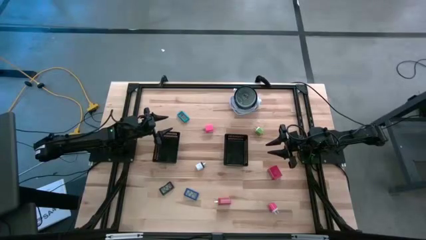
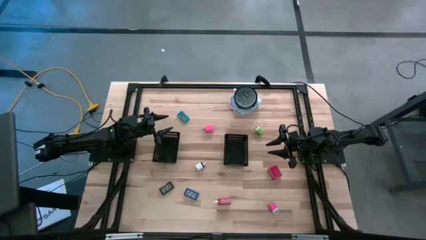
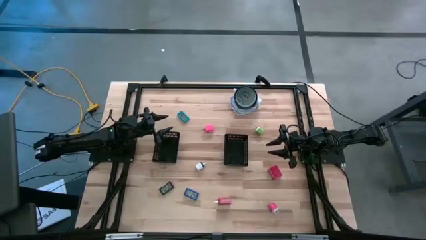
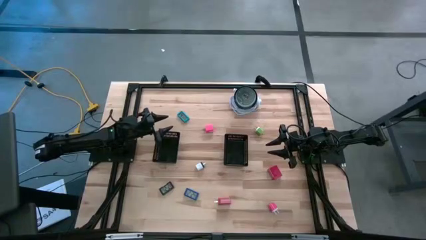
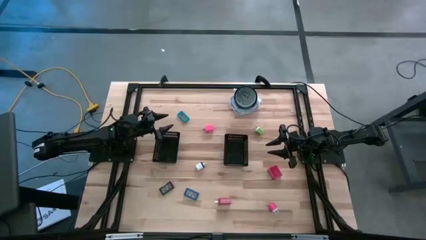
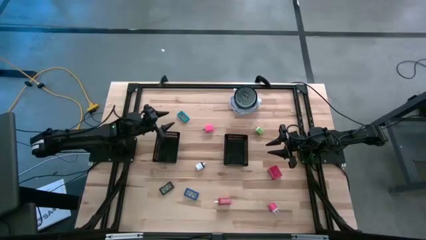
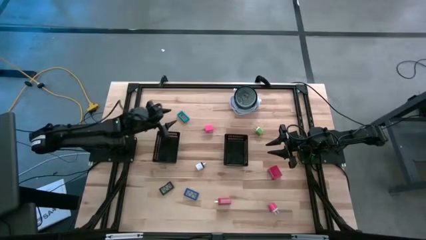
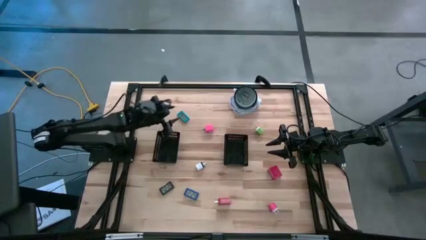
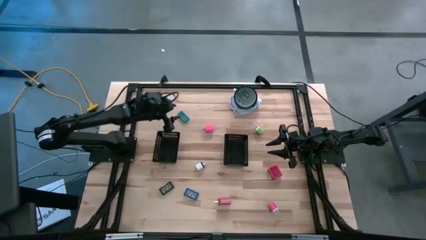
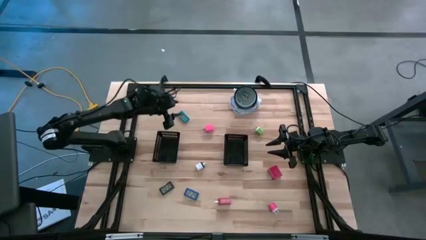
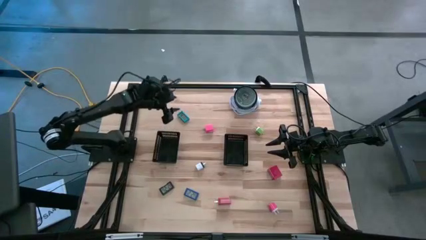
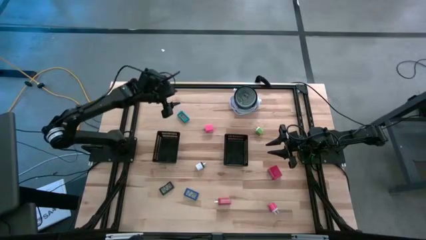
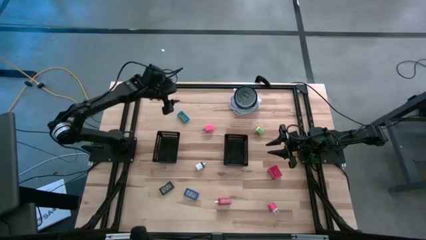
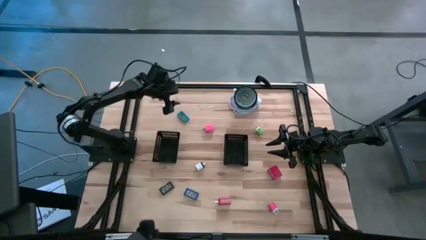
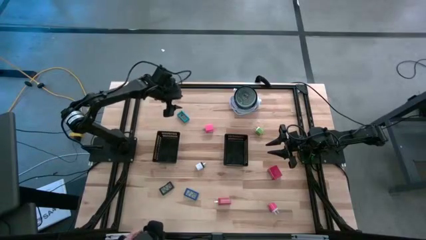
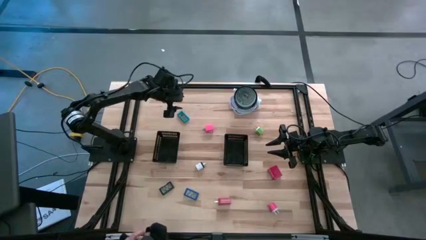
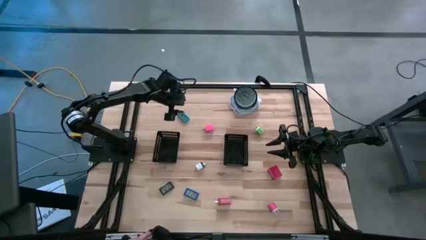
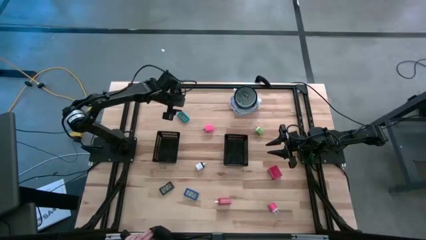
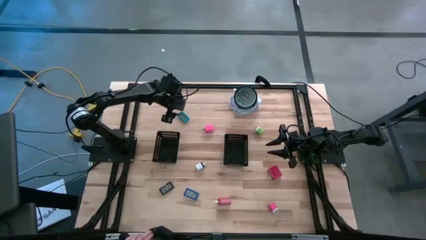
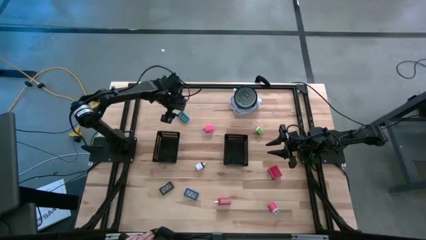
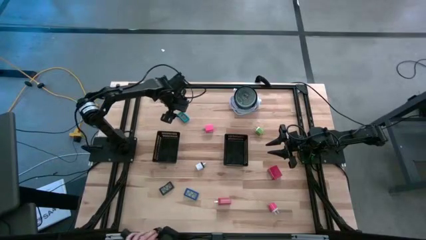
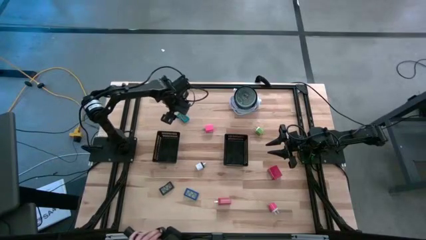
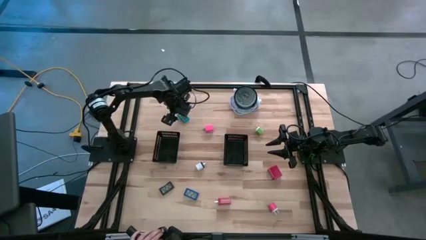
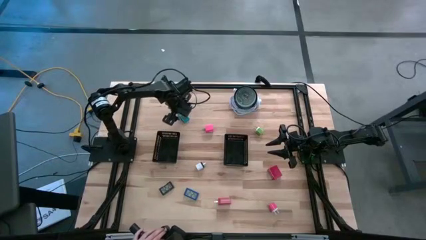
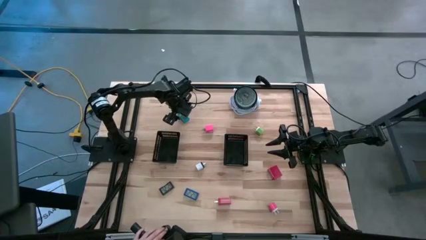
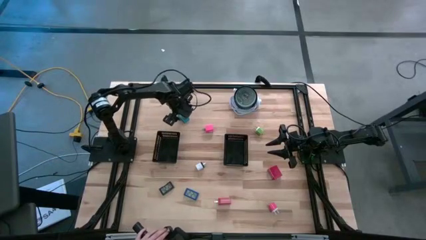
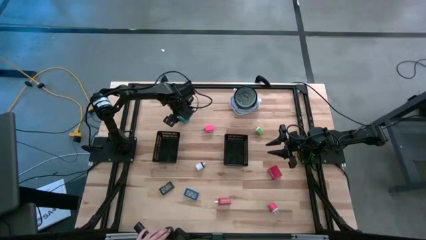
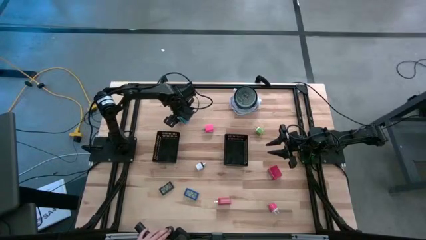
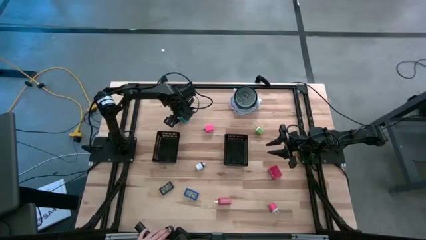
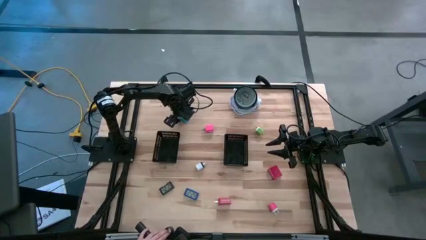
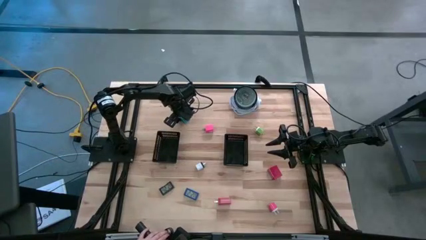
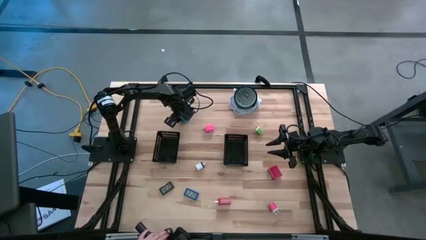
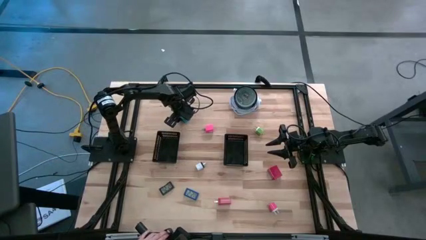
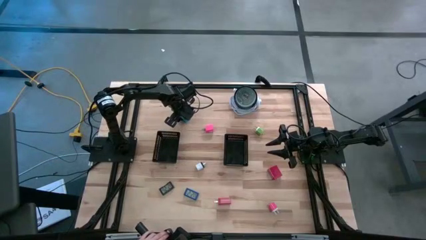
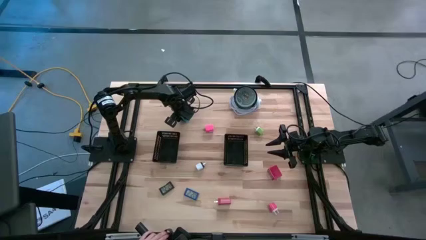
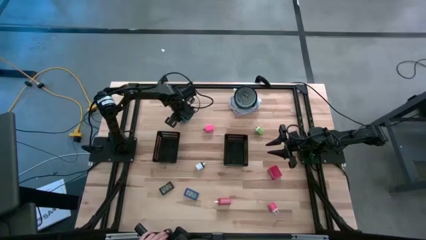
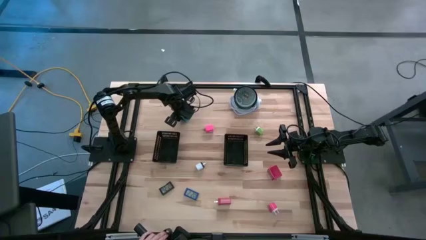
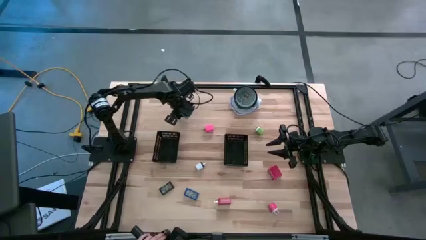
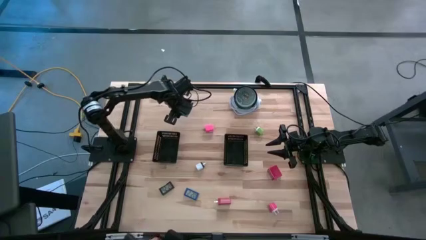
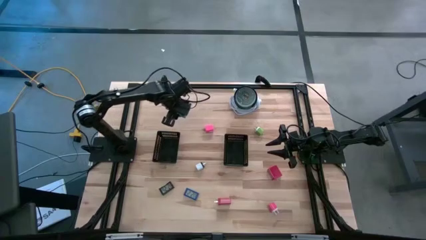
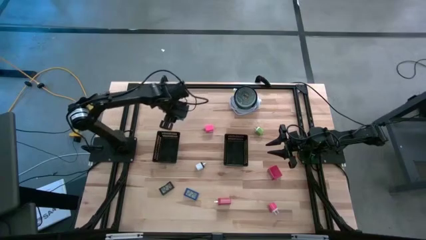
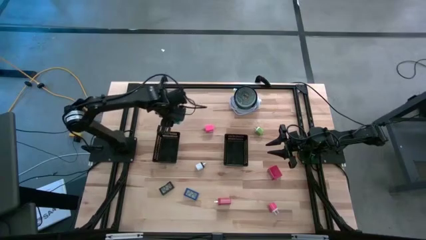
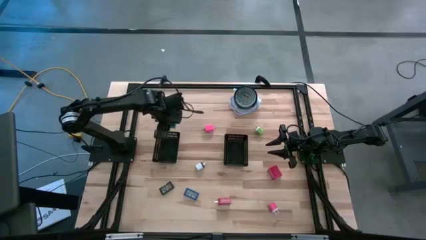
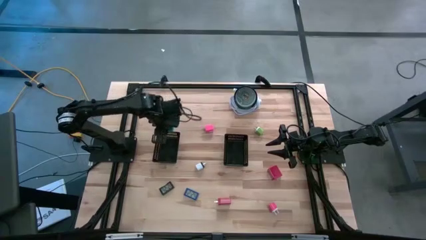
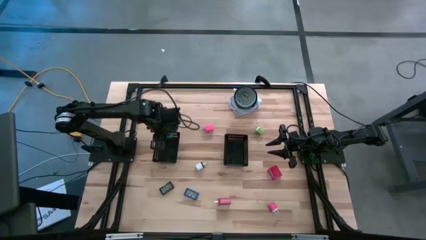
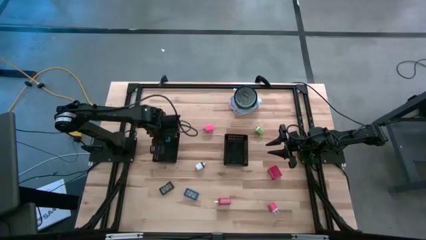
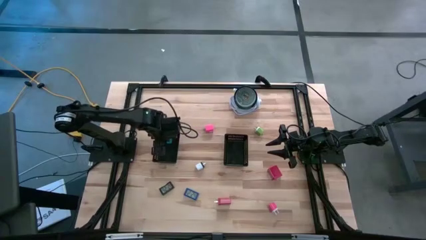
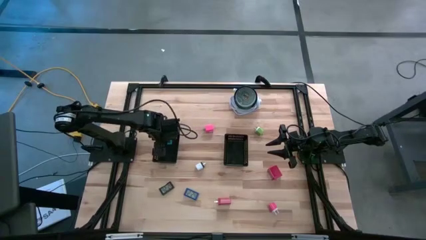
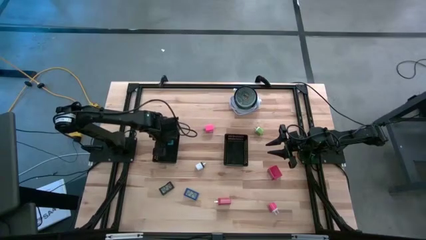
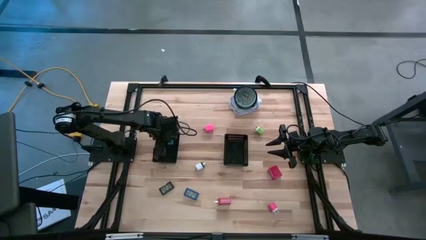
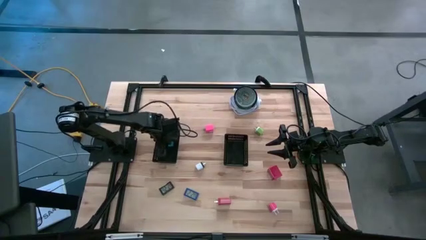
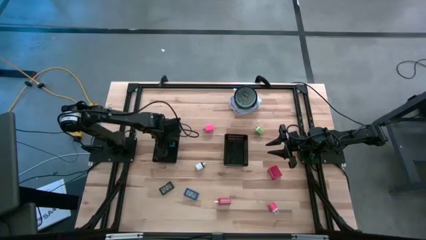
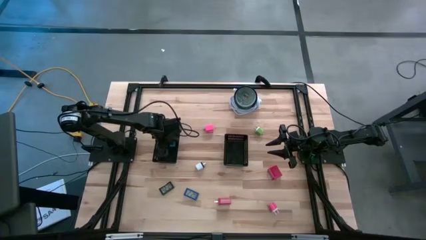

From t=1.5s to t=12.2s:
Task: Pick & Place Office items
Put the light blue digital clock into the left black bin
